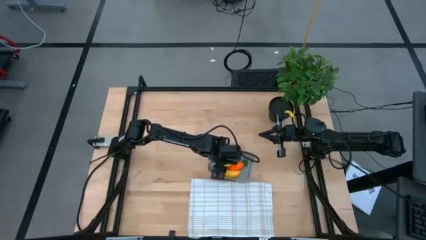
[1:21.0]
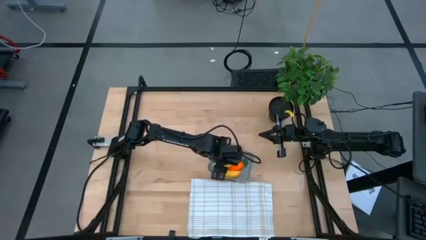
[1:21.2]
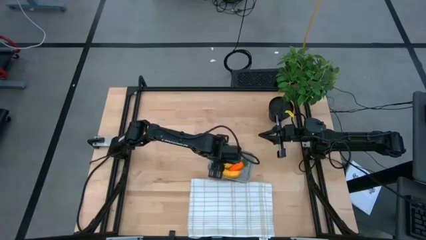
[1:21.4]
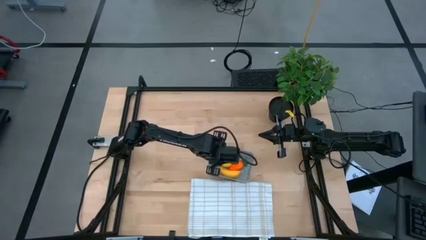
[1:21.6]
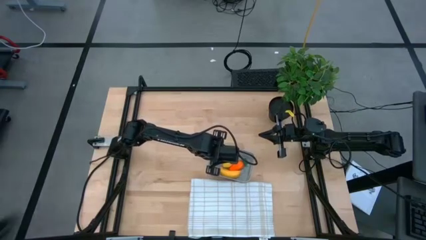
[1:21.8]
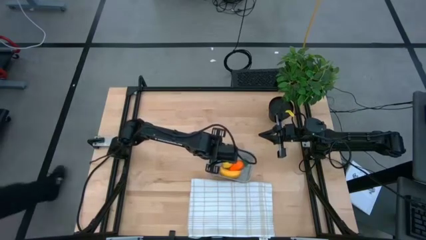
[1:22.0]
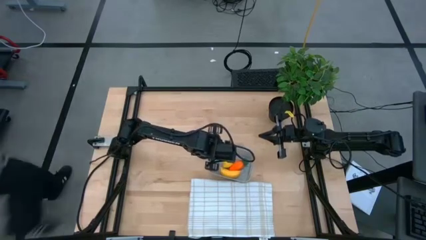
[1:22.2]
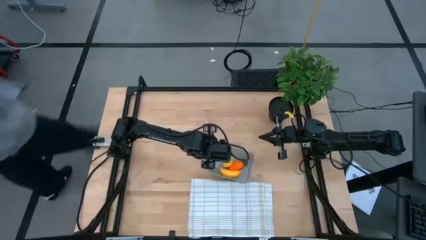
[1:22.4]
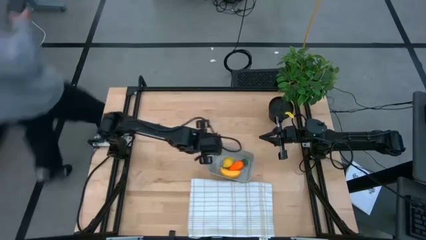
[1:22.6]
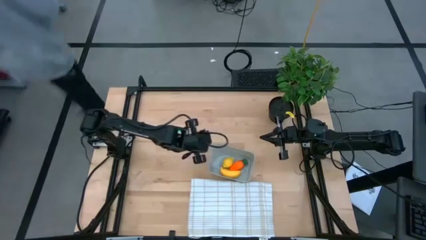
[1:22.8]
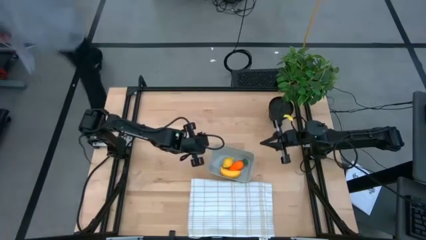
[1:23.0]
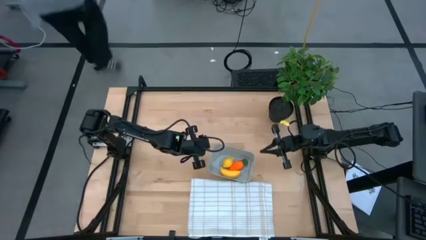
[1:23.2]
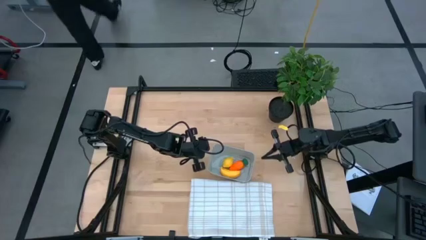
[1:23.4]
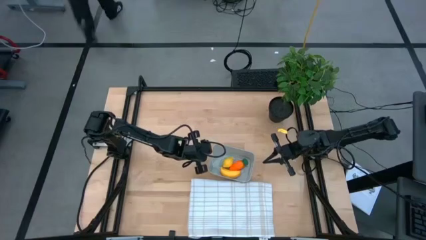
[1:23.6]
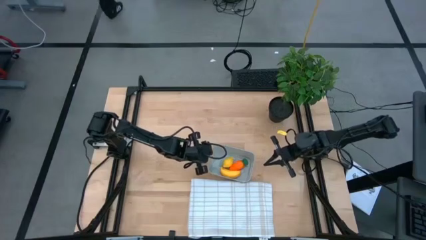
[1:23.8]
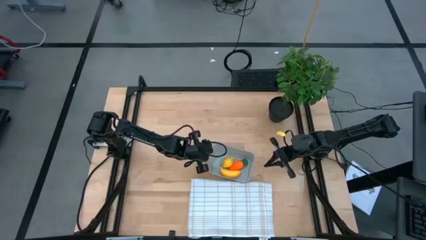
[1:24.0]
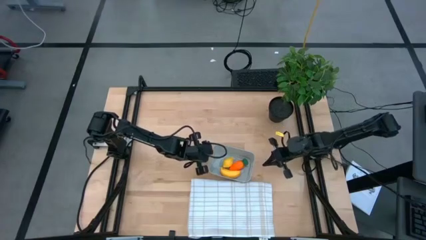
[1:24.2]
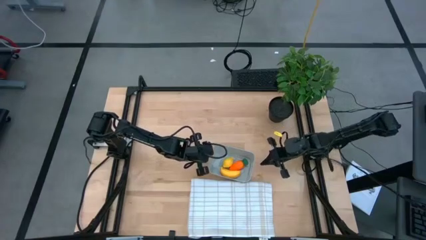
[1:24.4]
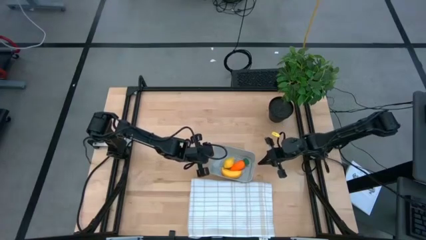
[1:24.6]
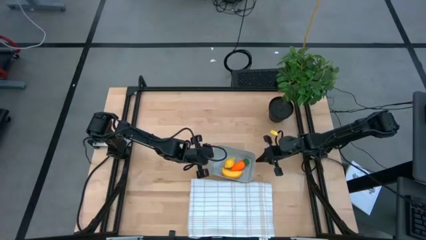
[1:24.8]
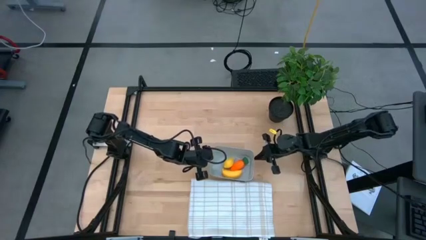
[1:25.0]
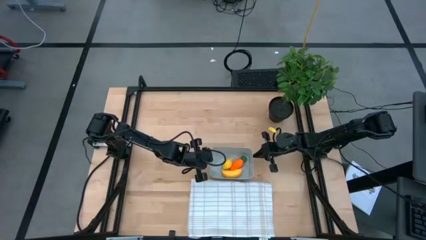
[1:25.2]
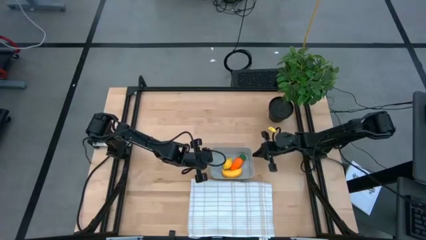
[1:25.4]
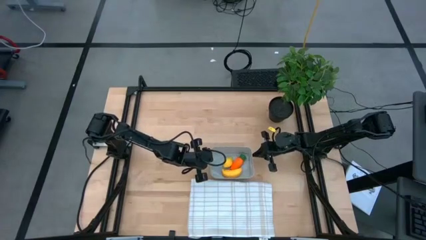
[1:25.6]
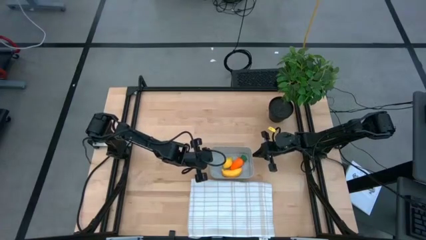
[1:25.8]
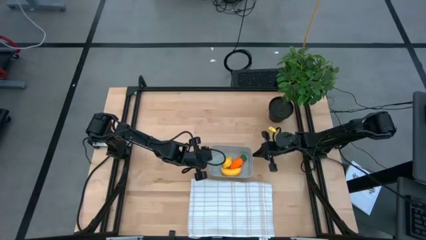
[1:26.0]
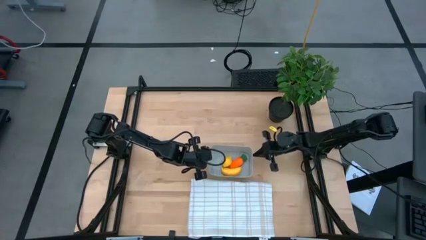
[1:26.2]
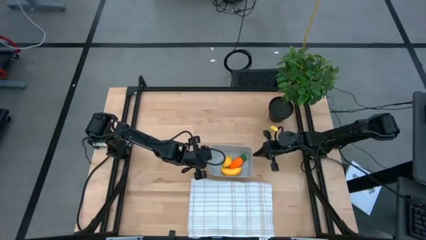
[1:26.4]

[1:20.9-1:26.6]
Task: Pick and placing Produce into tupperware
Adjust the gray bin

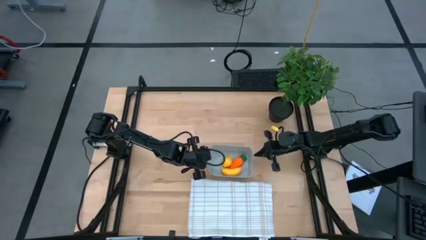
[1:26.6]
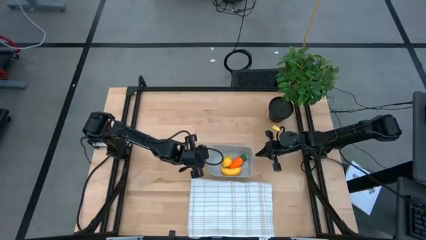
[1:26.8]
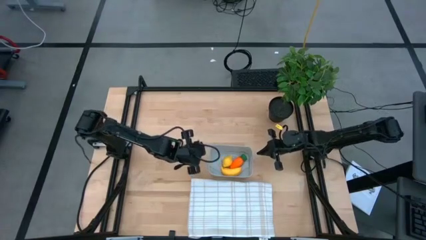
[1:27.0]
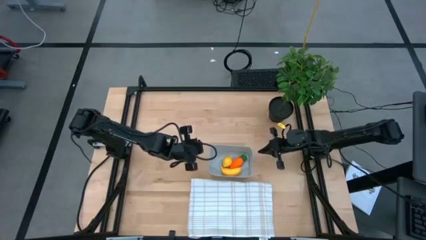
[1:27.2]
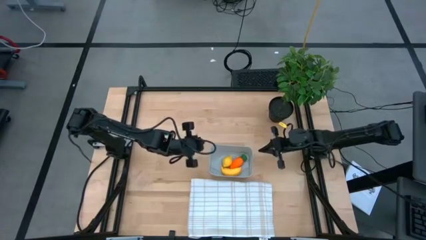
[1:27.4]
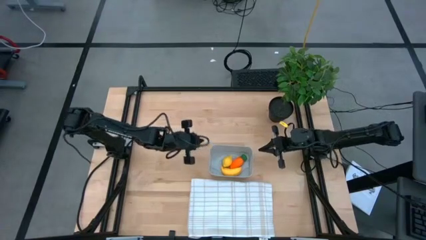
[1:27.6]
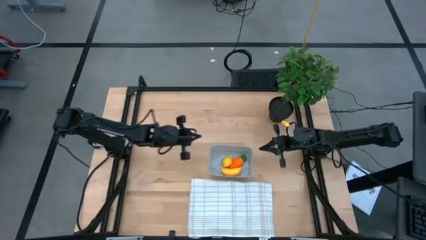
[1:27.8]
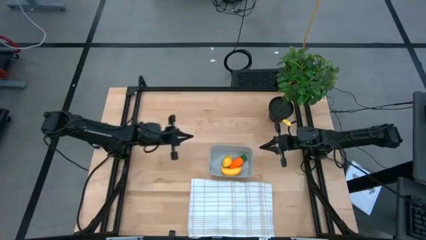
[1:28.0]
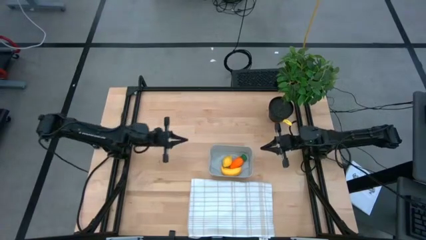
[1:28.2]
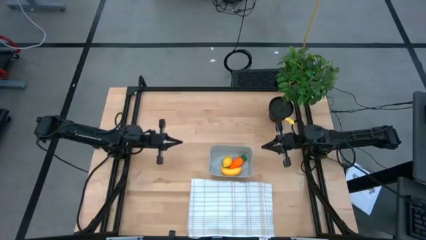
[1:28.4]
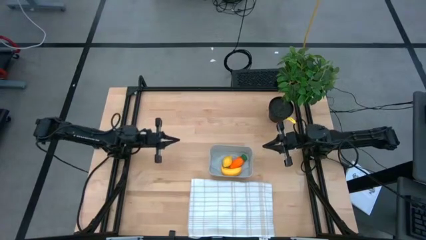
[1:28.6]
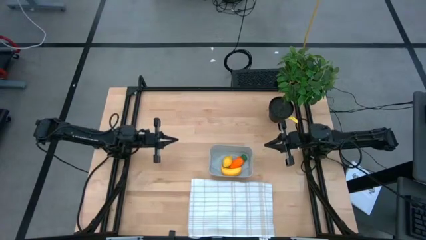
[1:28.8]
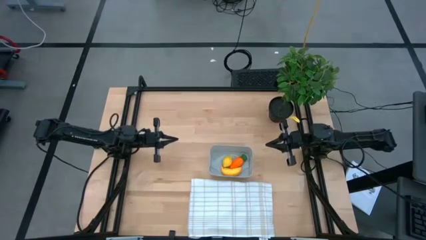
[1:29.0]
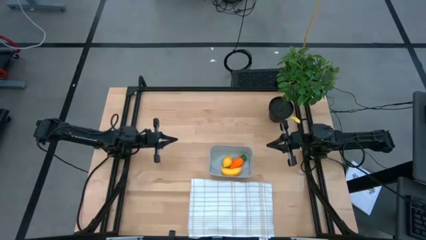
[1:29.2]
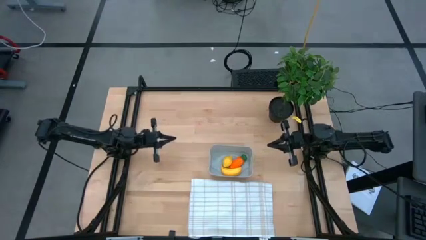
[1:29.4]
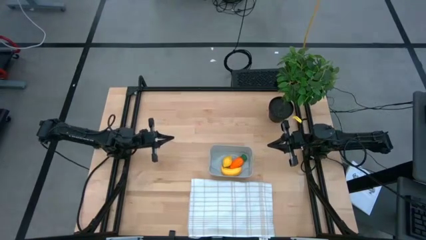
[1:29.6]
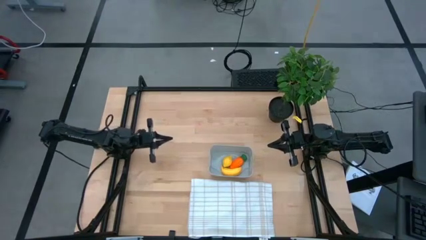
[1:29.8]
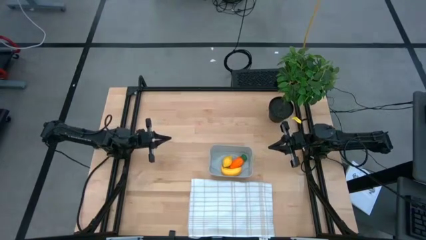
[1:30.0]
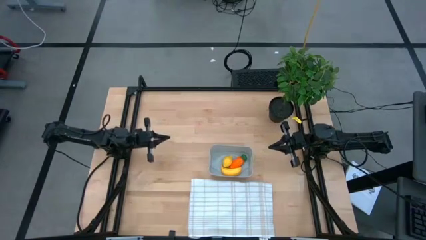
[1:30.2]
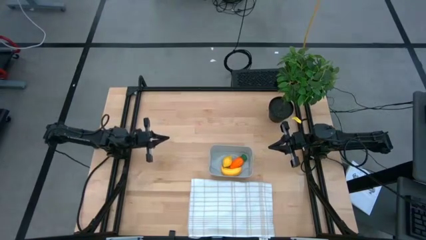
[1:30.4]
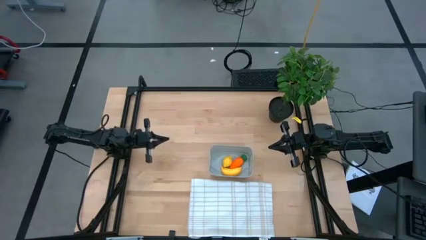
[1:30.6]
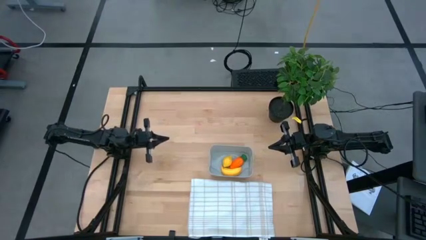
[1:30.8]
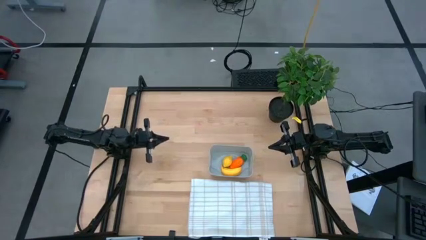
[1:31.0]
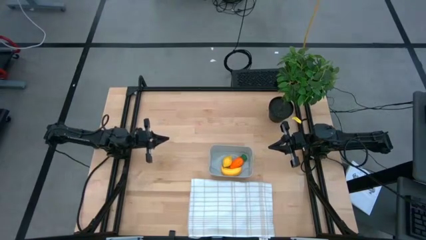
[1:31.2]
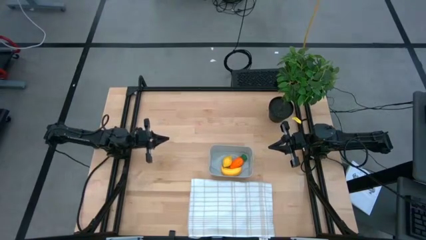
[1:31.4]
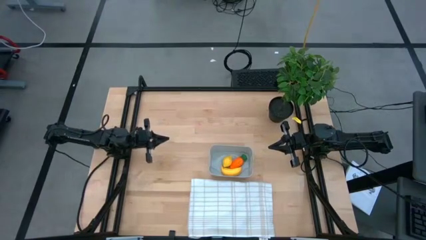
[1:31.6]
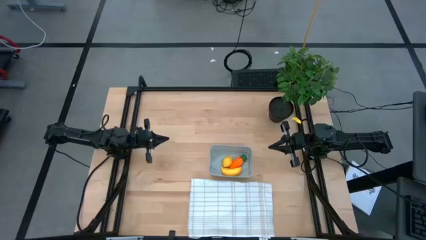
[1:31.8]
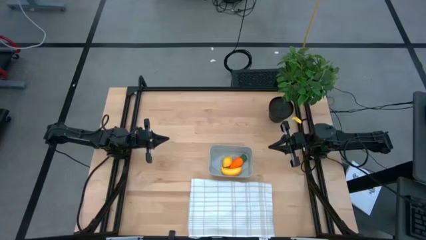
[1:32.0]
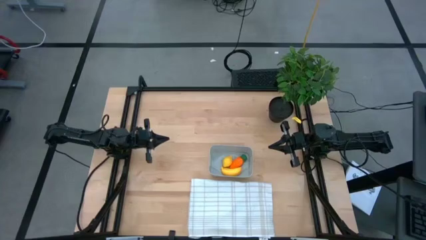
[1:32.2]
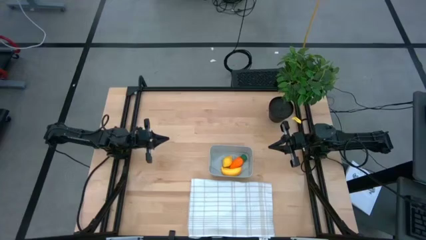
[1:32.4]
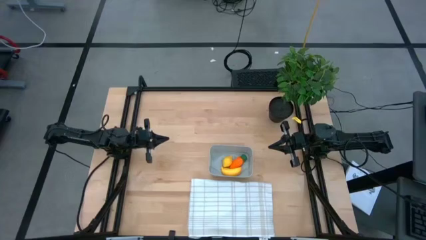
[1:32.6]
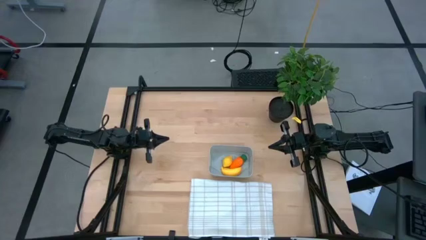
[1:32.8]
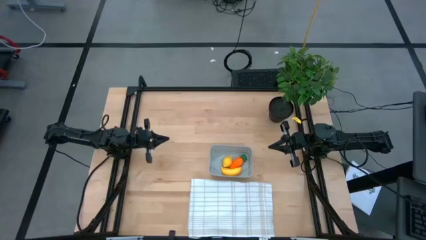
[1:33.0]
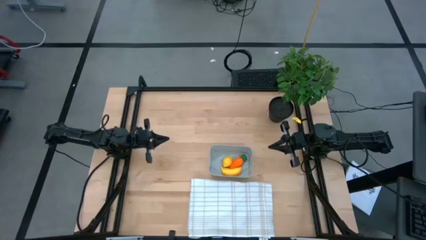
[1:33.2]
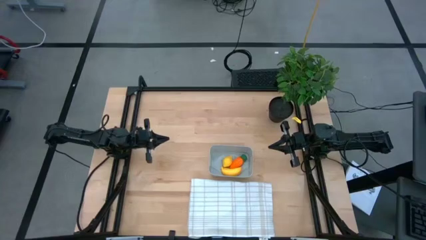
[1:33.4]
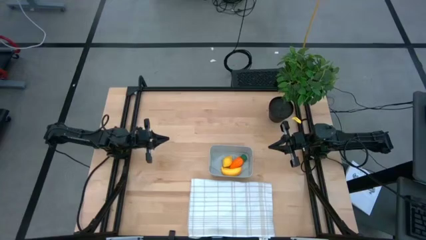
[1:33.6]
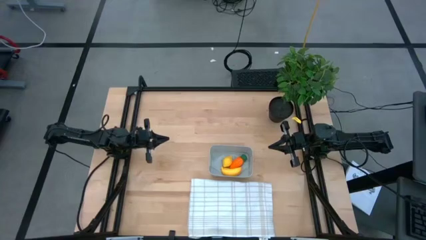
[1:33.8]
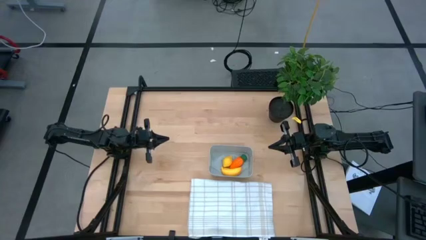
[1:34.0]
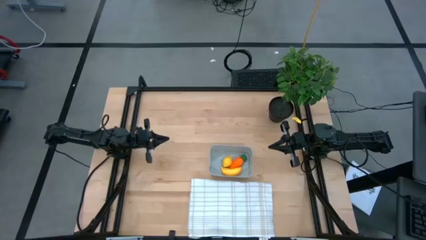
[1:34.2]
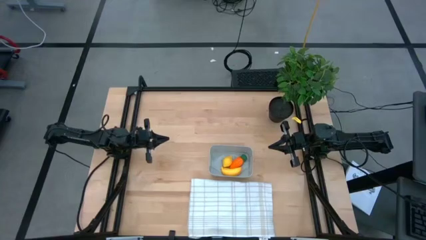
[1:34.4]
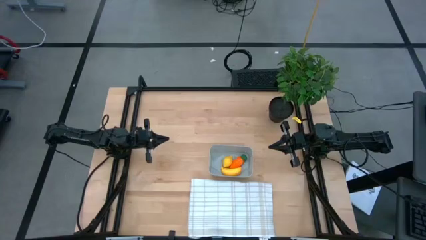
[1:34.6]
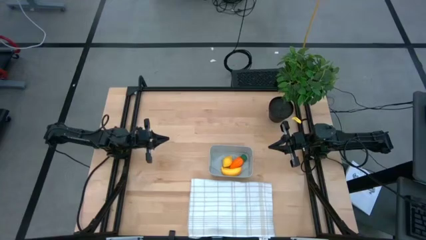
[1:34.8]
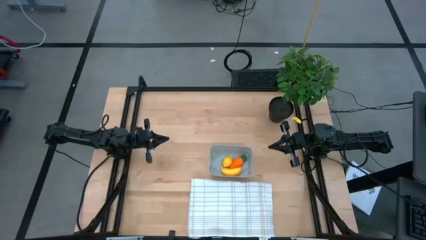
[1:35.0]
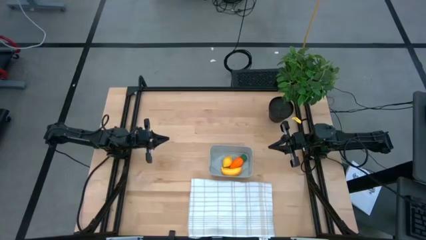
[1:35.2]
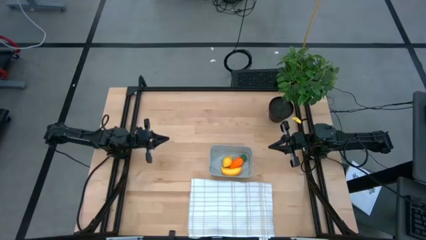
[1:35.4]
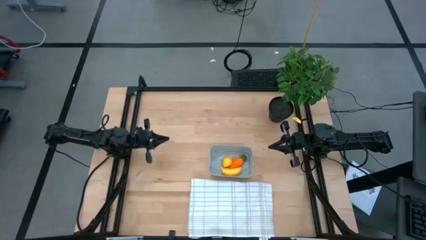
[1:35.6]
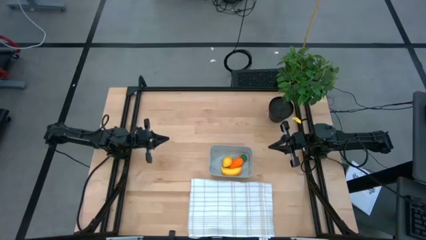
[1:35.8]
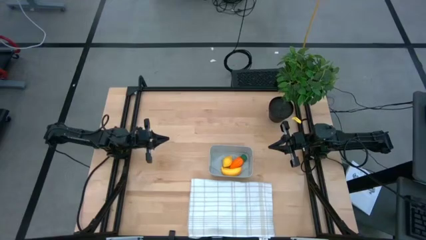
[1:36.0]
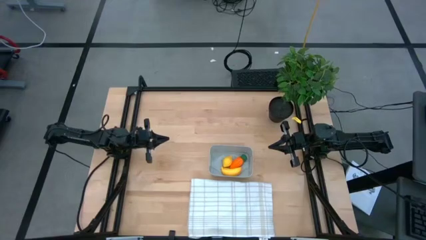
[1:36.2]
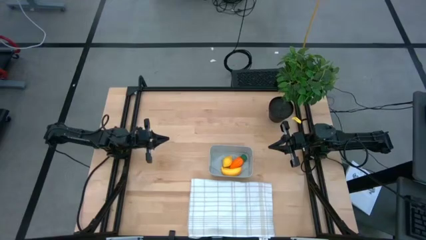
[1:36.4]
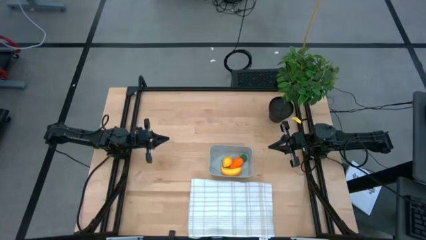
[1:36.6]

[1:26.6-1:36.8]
Return to Home Position
